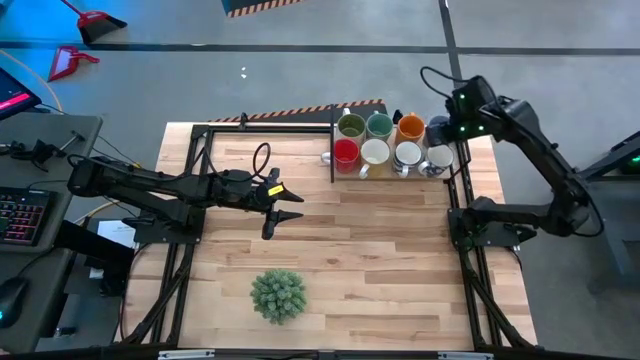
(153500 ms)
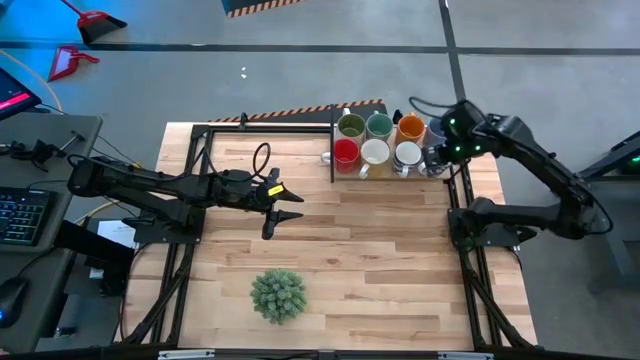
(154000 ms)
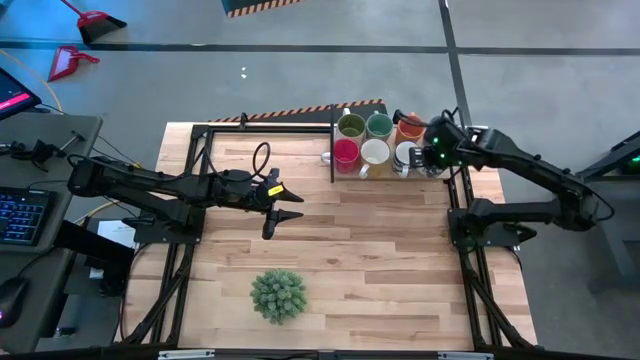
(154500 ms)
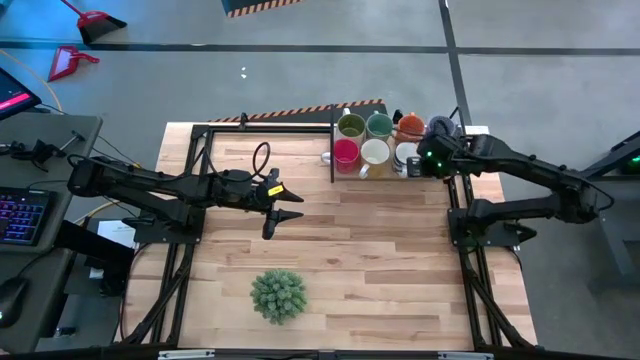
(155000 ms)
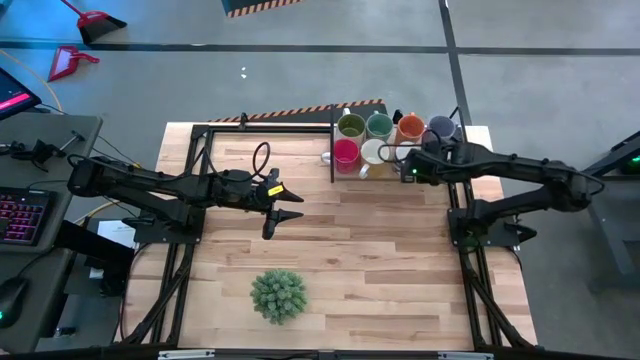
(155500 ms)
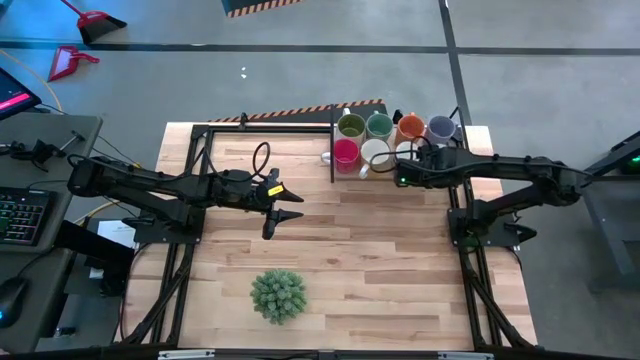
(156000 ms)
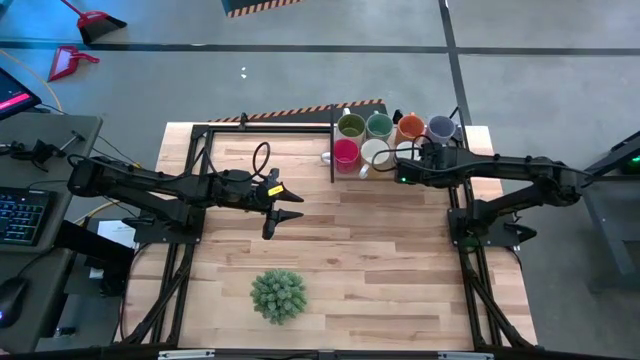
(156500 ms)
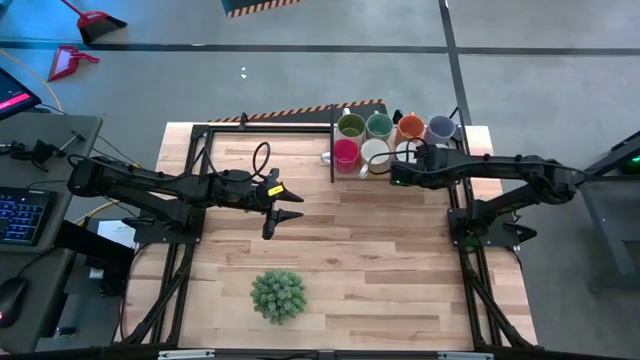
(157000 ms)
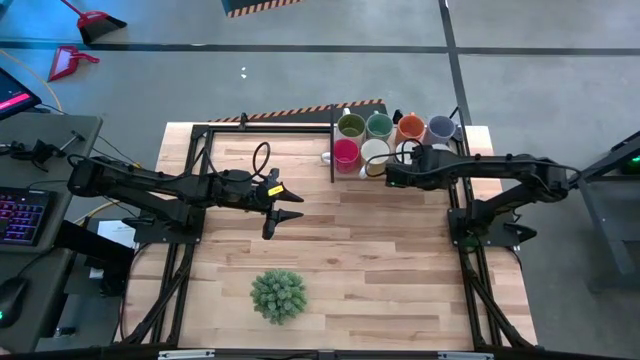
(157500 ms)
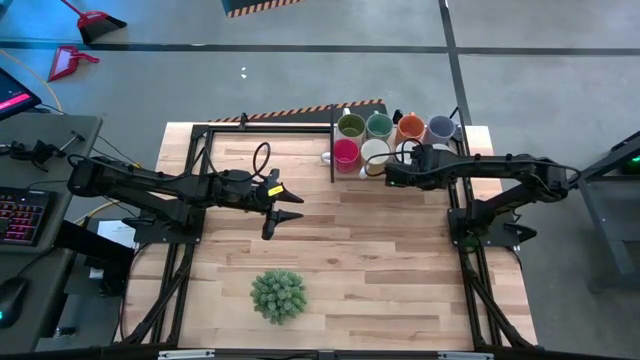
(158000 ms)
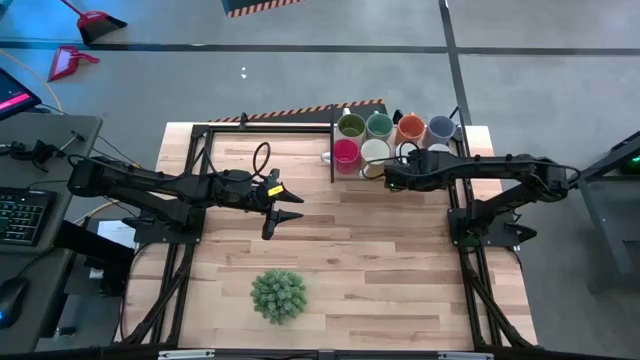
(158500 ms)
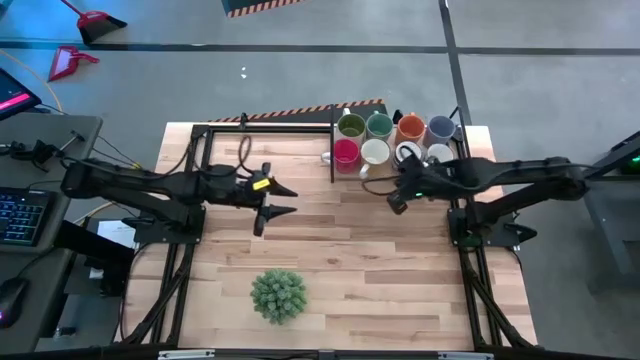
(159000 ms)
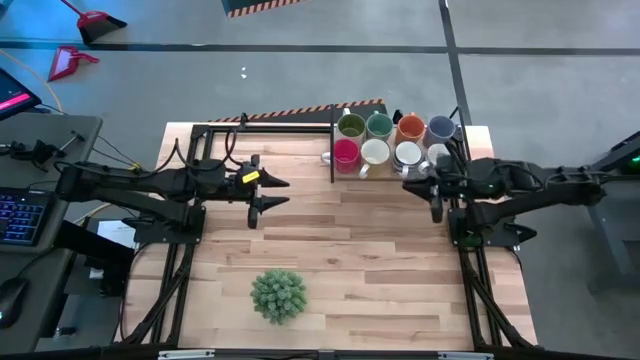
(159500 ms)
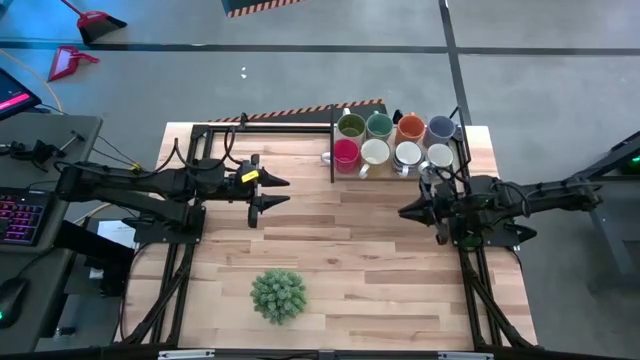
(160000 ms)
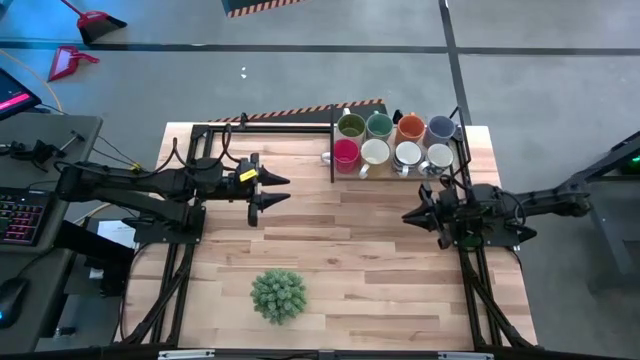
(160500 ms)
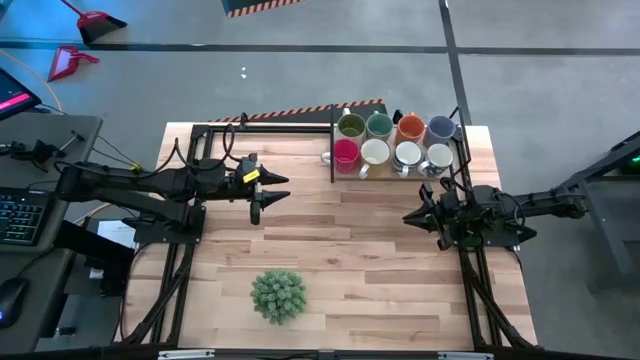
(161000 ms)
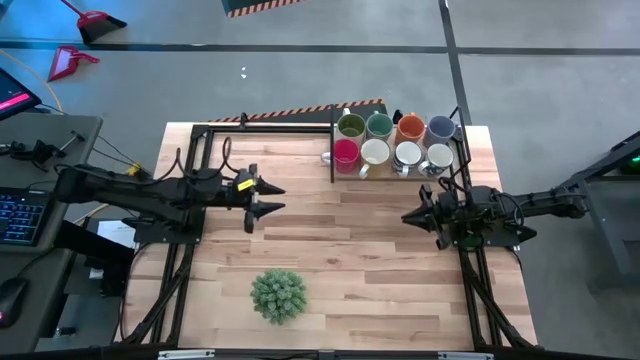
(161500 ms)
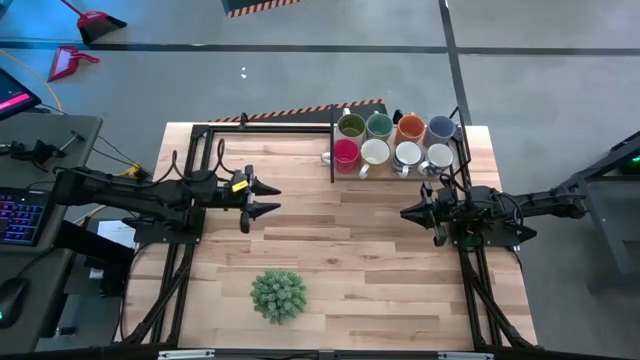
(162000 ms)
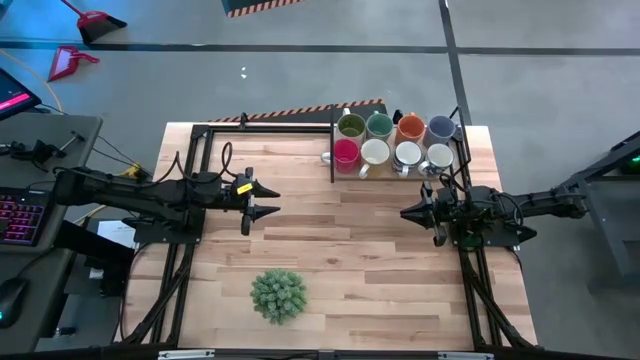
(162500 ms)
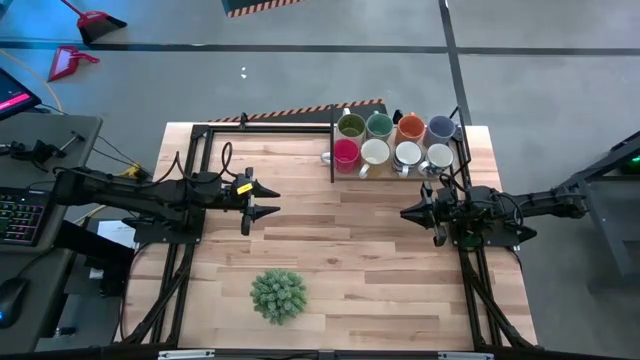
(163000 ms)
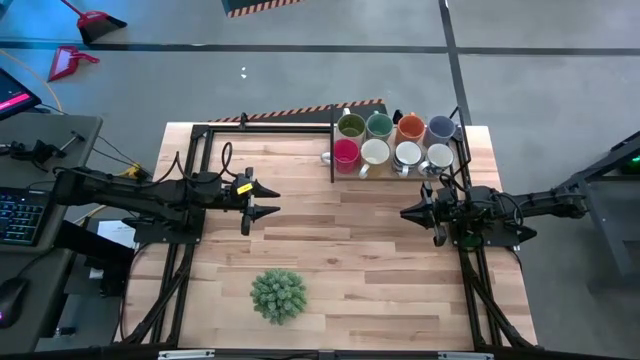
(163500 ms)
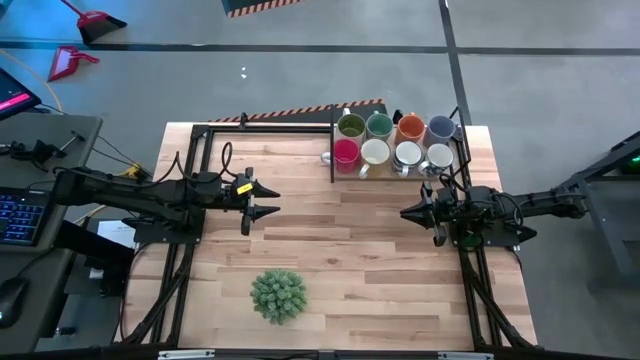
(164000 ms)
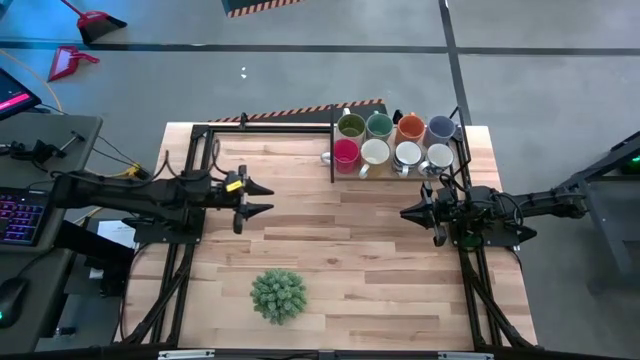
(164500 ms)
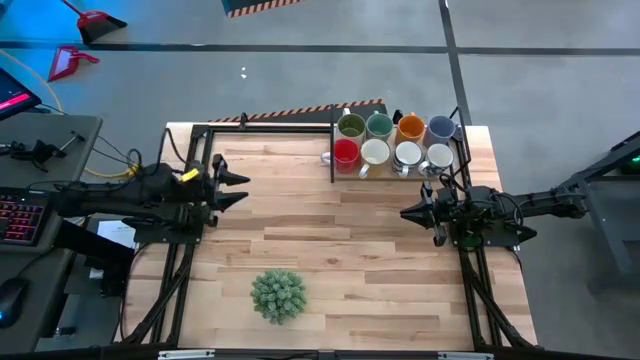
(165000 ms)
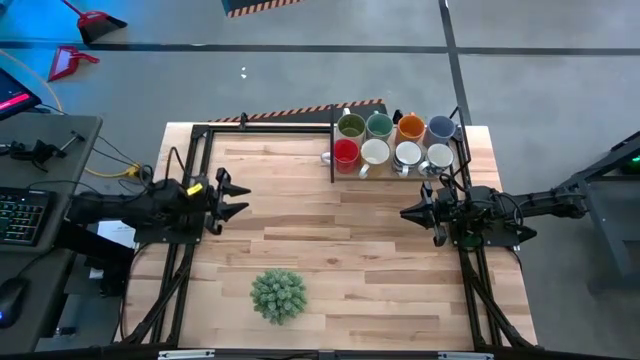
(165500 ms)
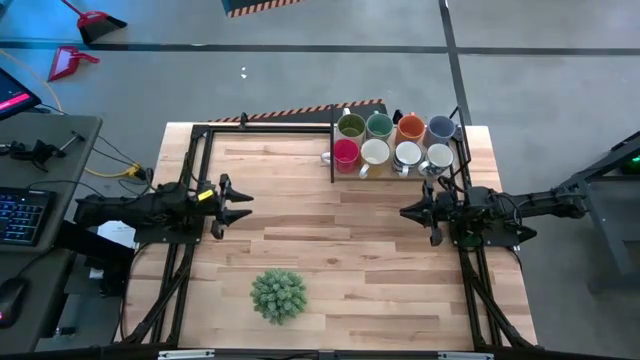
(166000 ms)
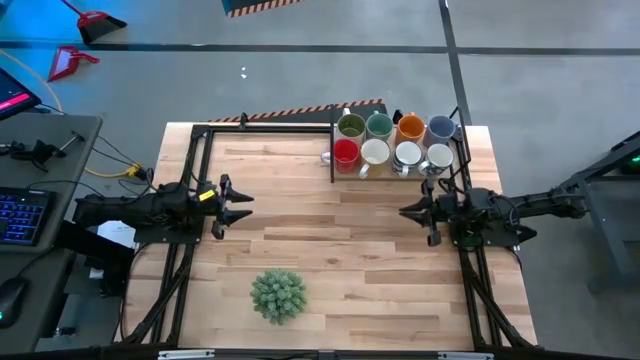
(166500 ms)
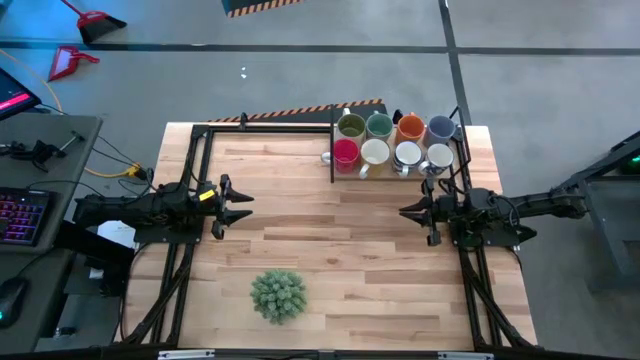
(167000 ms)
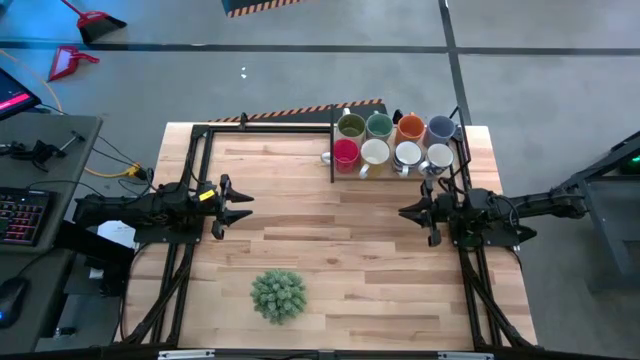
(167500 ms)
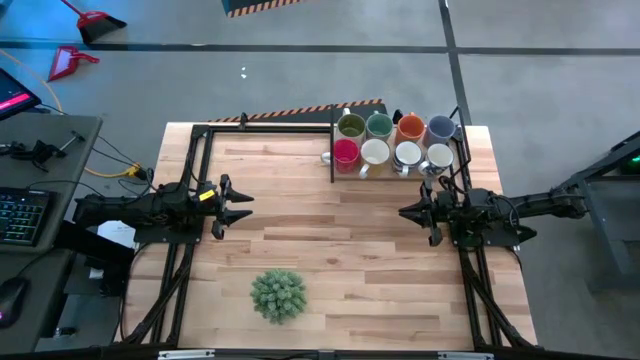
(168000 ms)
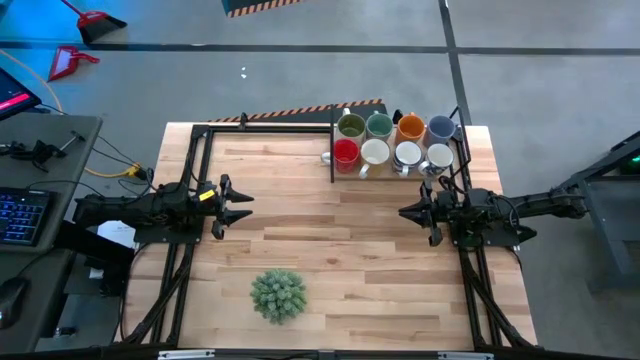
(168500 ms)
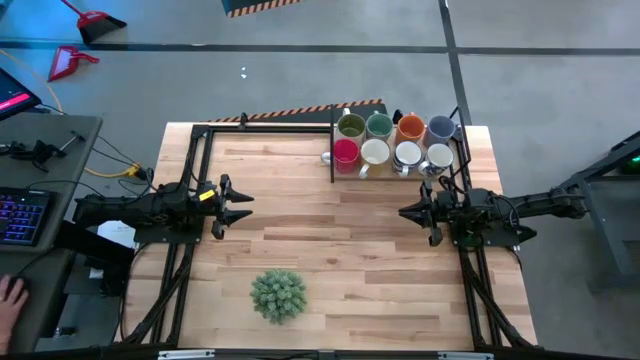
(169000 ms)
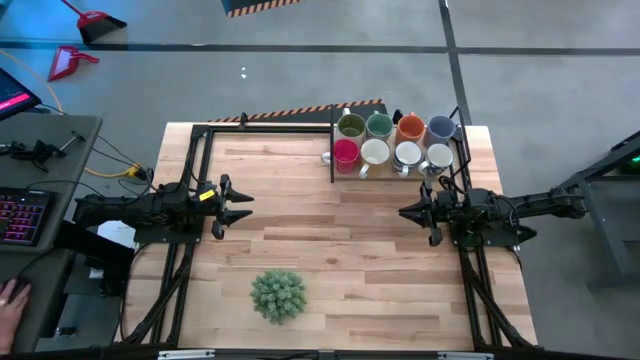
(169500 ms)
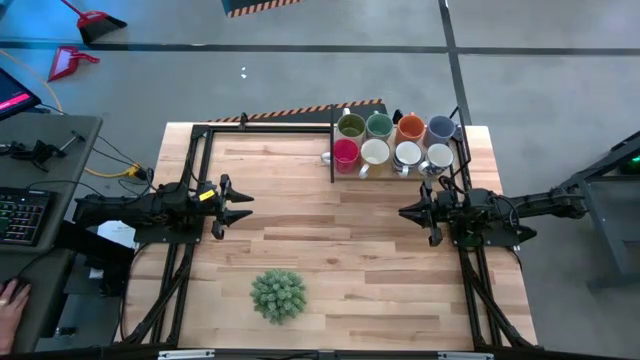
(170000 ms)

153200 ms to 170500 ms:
Task: Place coffee mugs
Return to Home Position
